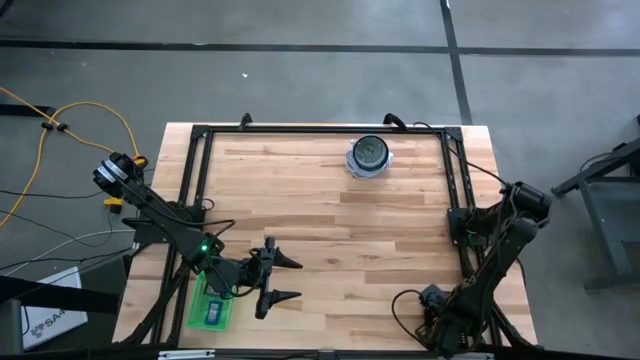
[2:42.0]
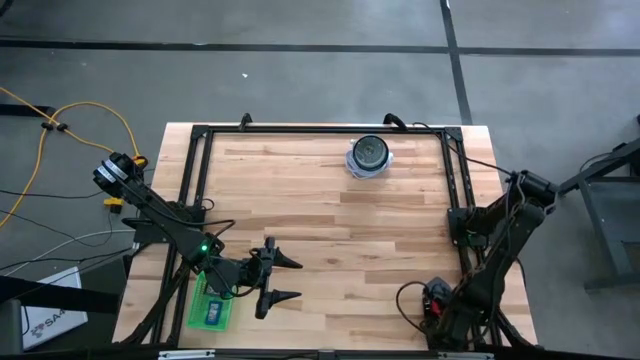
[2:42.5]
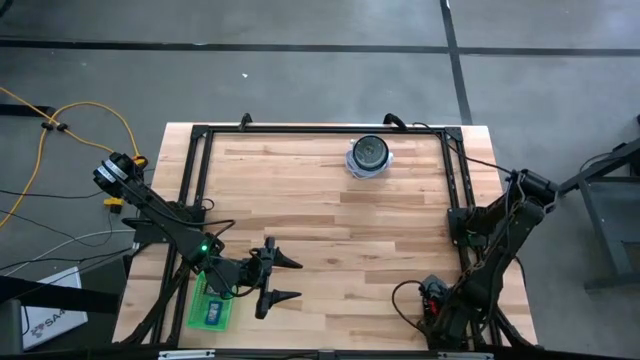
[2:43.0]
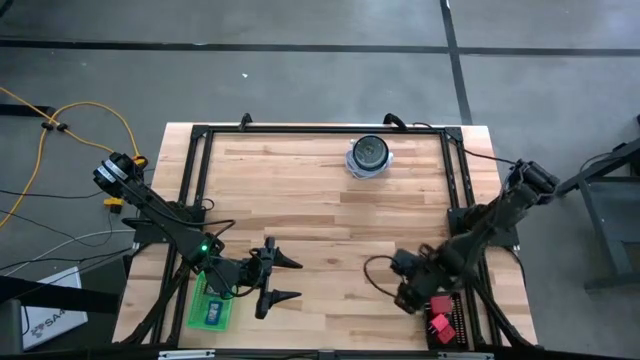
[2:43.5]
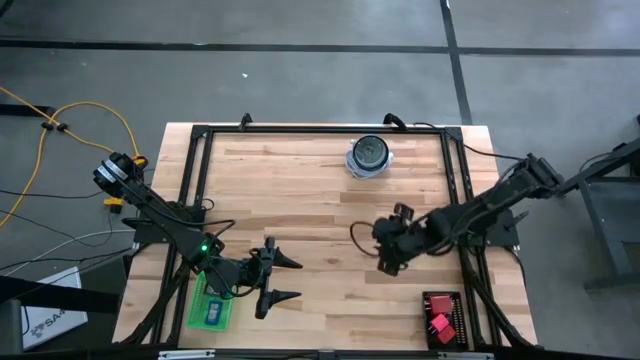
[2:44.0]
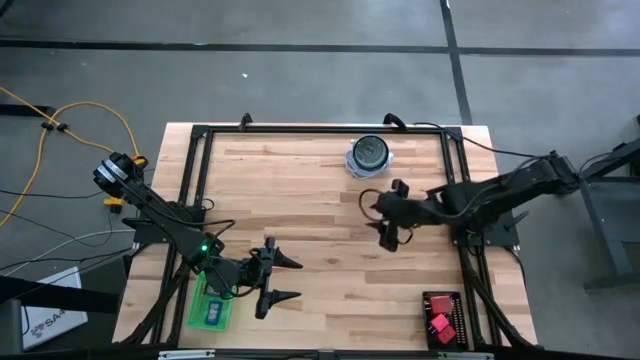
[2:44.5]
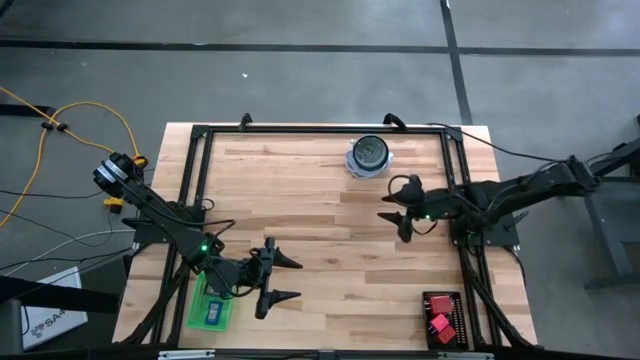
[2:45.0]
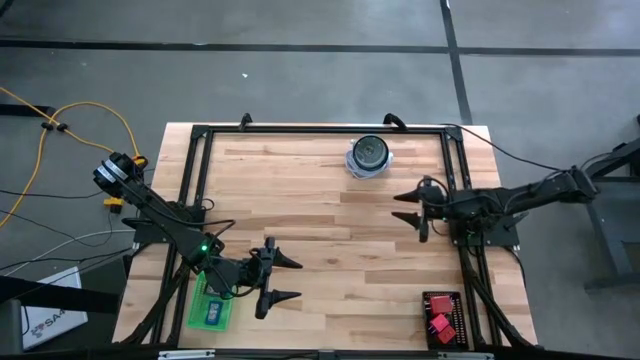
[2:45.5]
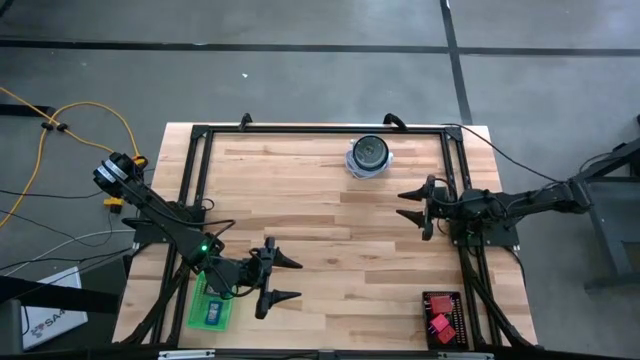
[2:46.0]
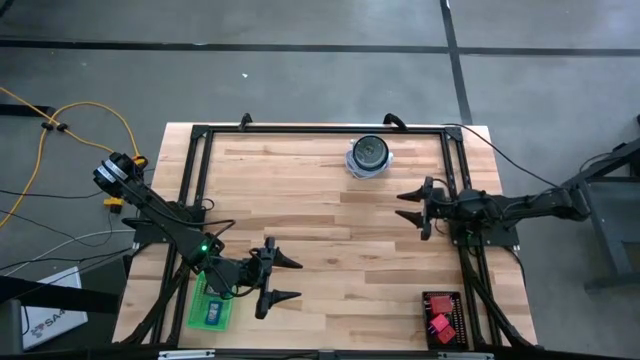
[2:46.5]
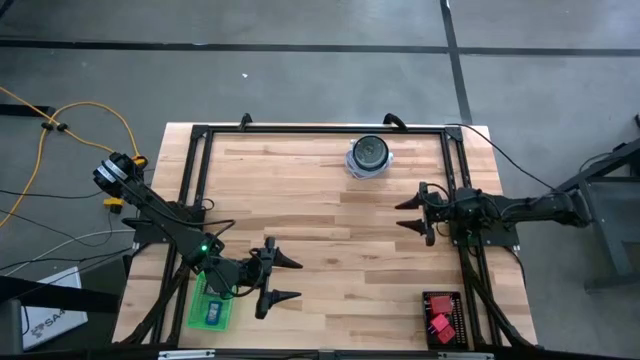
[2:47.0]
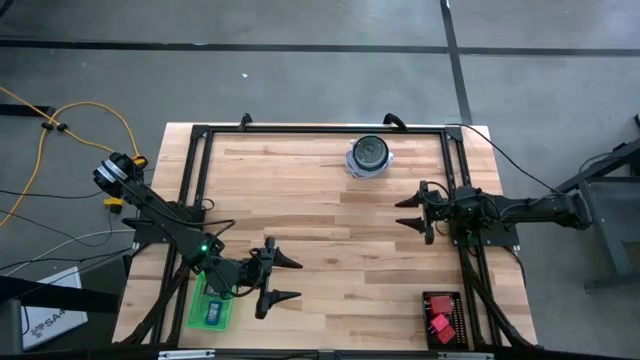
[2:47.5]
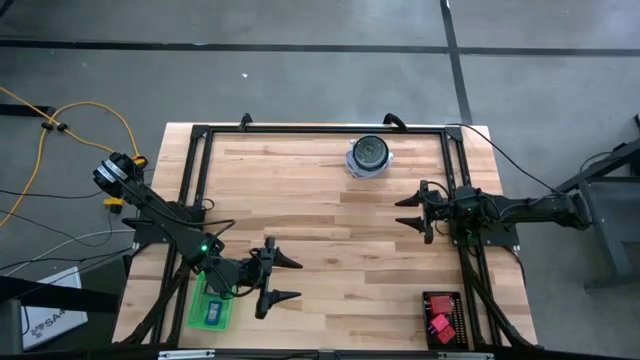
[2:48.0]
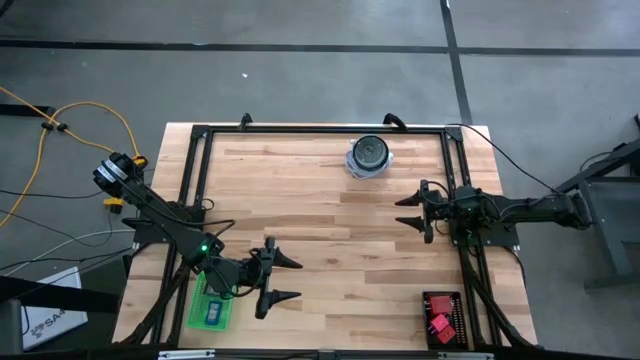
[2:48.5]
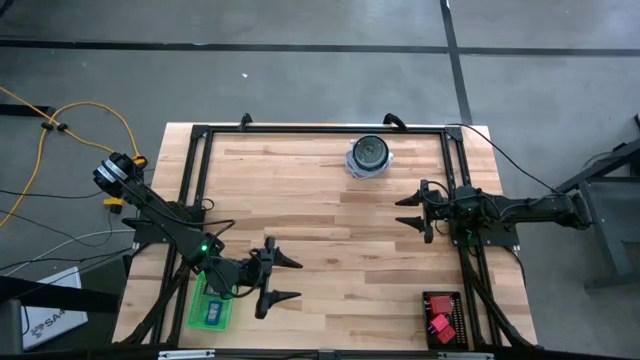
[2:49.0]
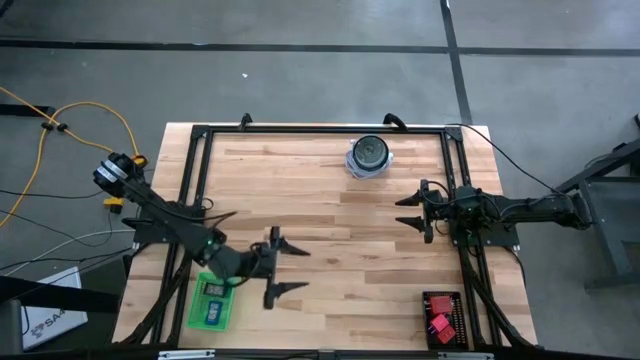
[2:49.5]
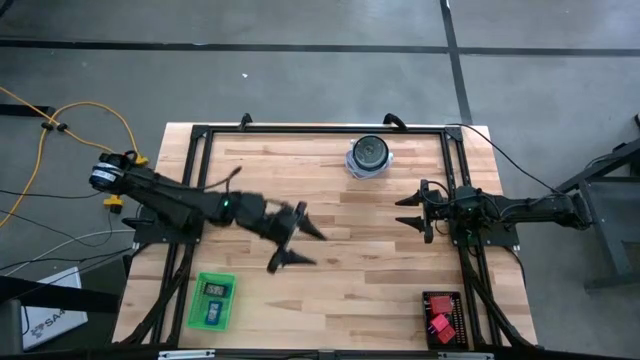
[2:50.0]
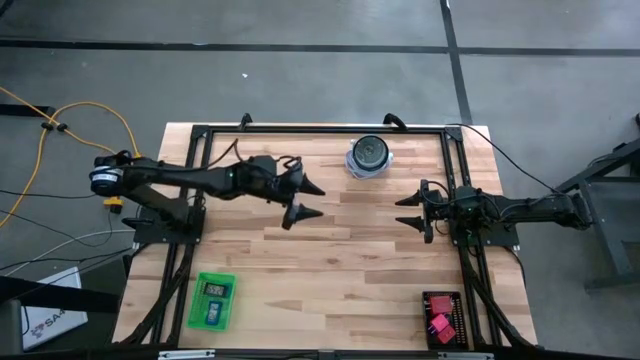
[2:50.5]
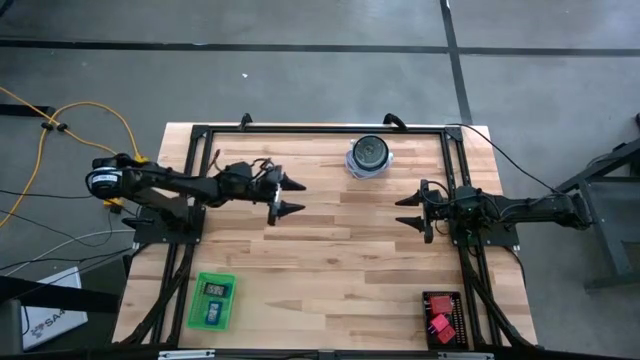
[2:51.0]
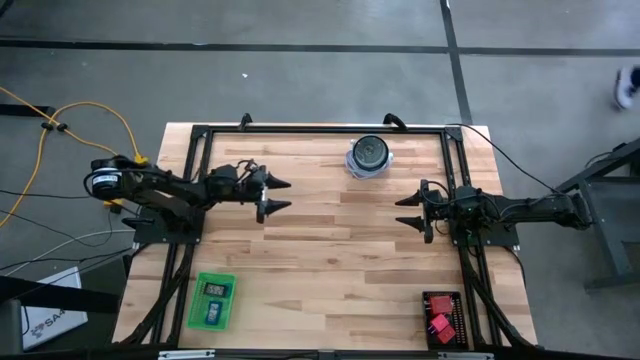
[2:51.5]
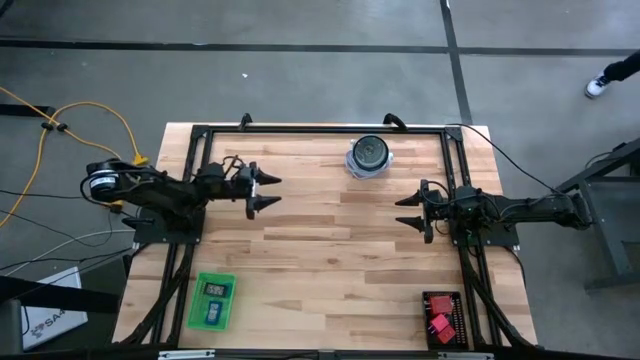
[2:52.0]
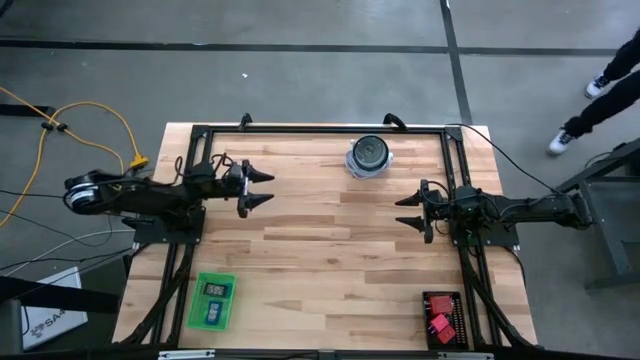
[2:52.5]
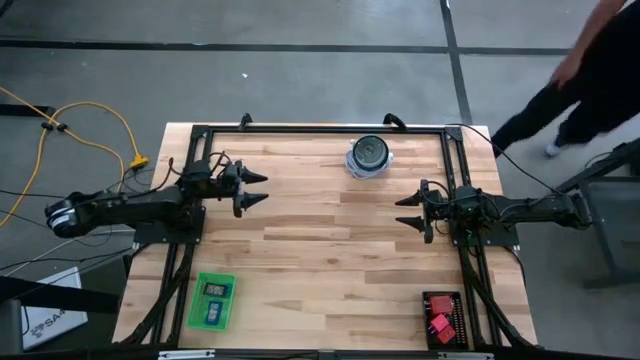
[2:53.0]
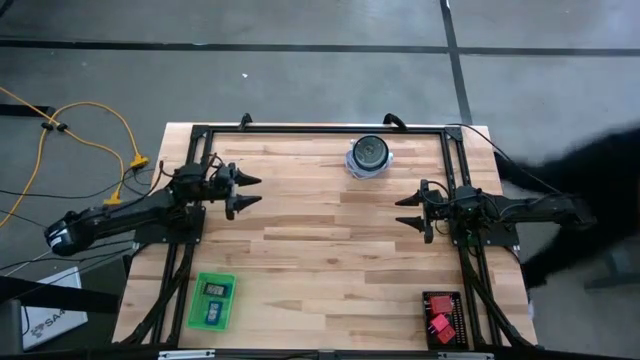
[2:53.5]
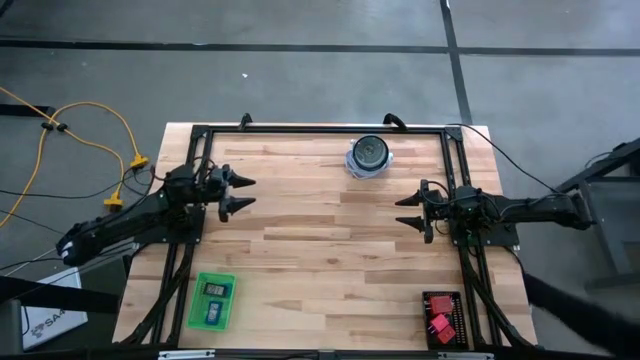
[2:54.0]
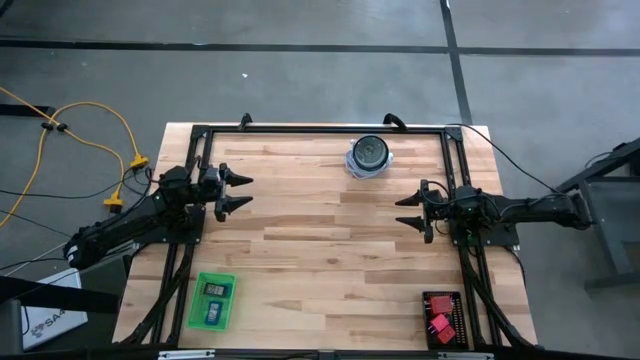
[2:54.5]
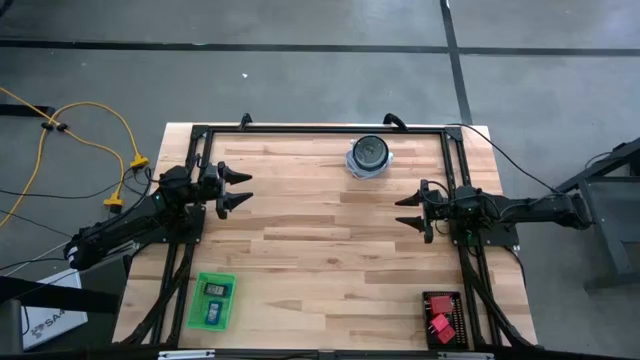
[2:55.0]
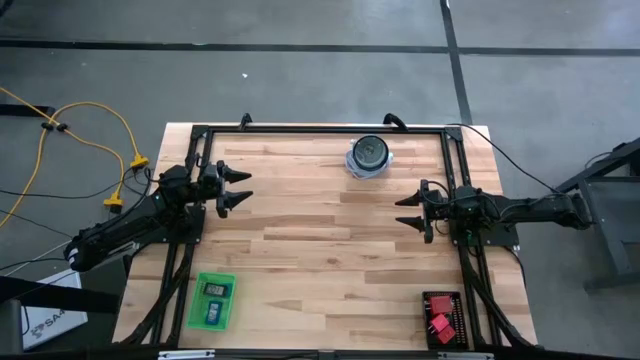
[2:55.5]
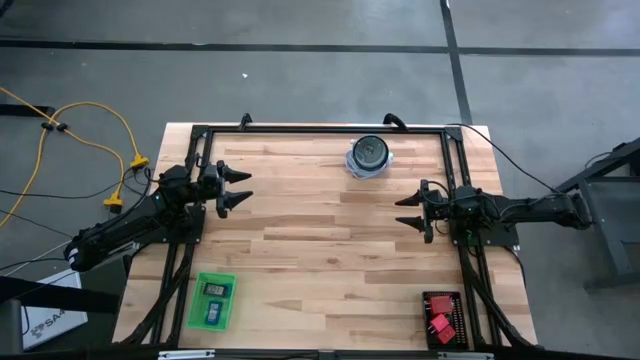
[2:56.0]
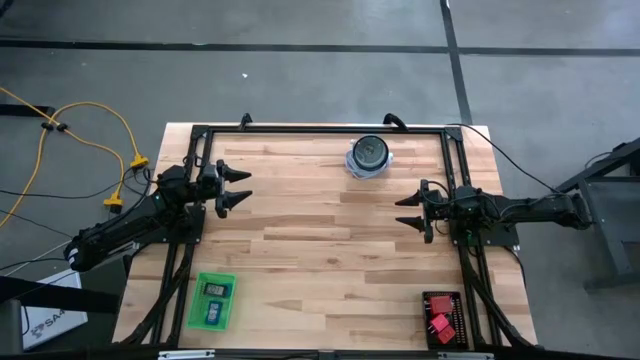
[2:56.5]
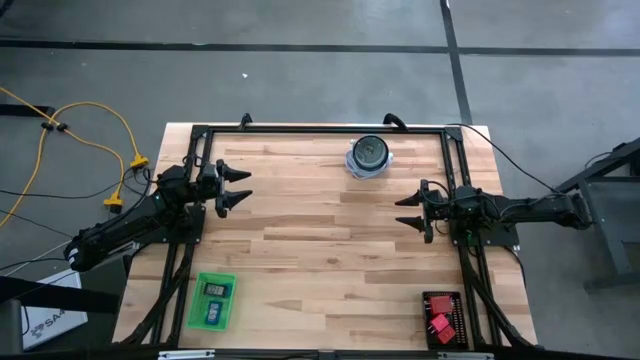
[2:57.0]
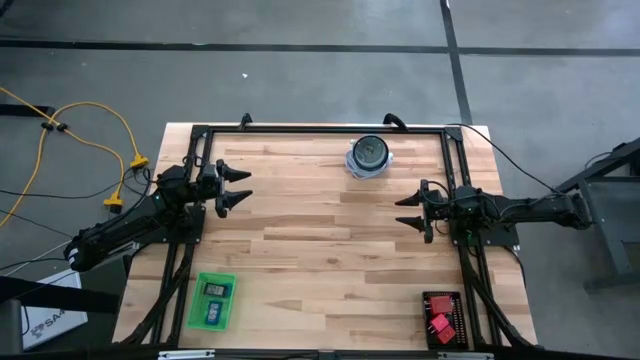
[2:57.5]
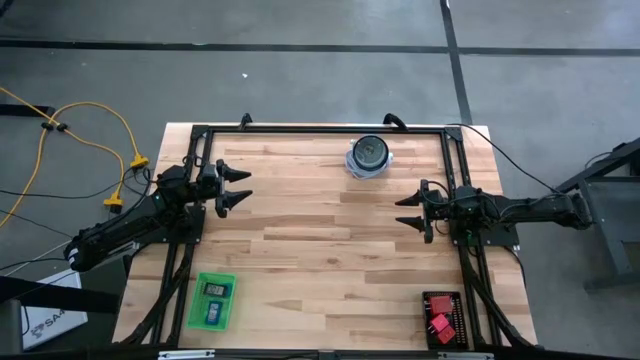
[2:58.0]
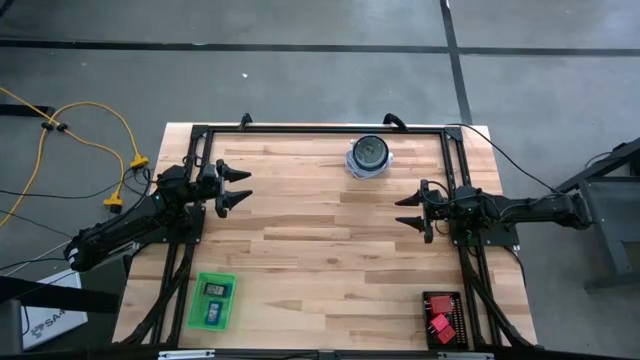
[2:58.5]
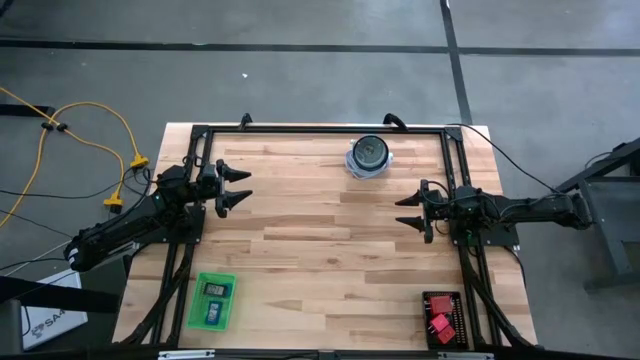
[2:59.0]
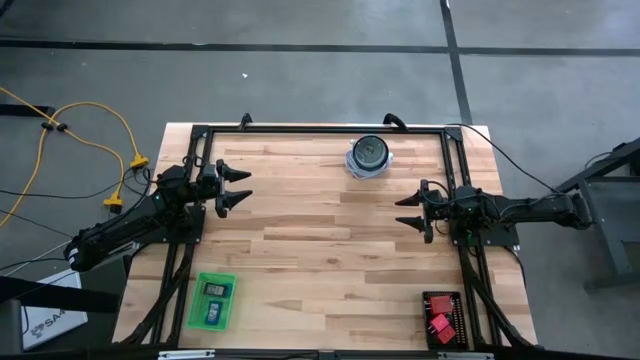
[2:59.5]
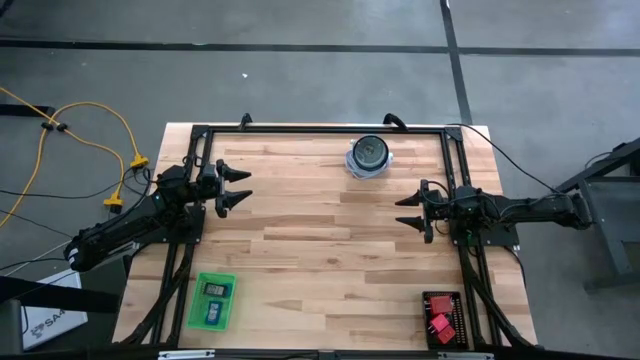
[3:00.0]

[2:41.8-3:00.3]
Task: Pick & Place Office items
Return to Home Position

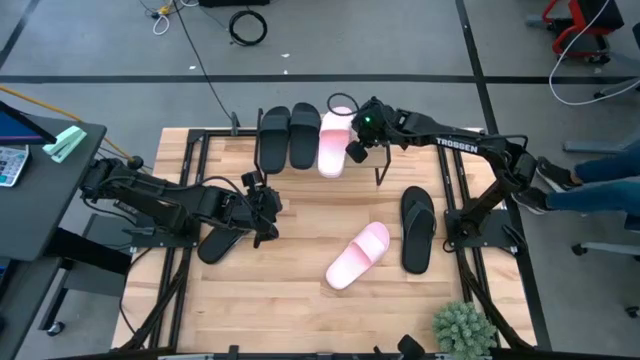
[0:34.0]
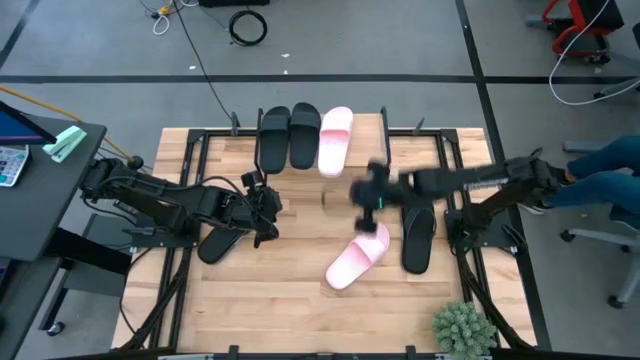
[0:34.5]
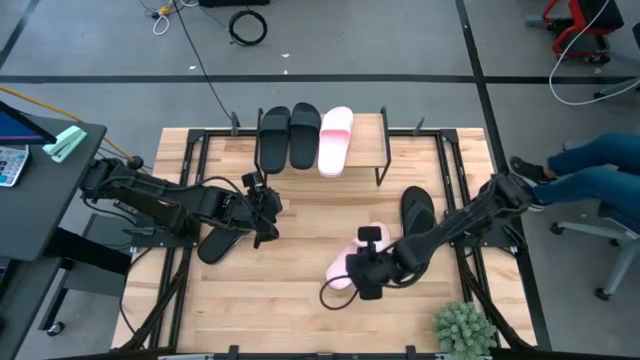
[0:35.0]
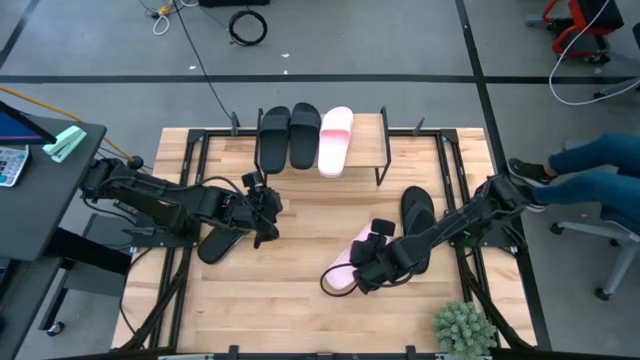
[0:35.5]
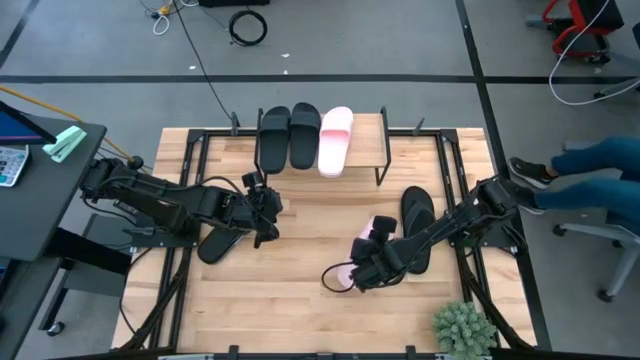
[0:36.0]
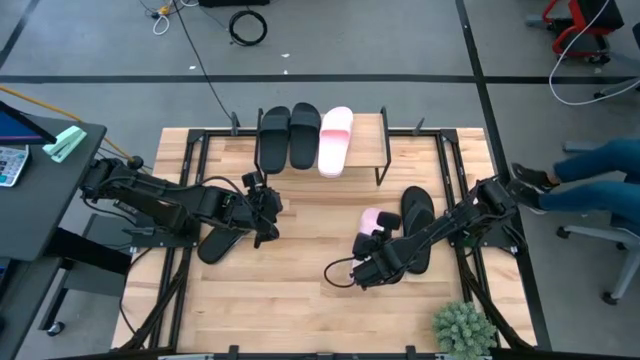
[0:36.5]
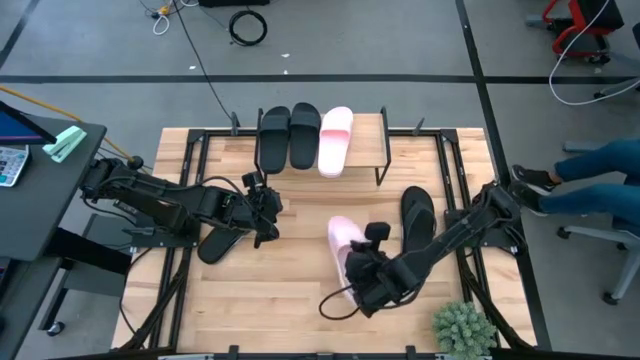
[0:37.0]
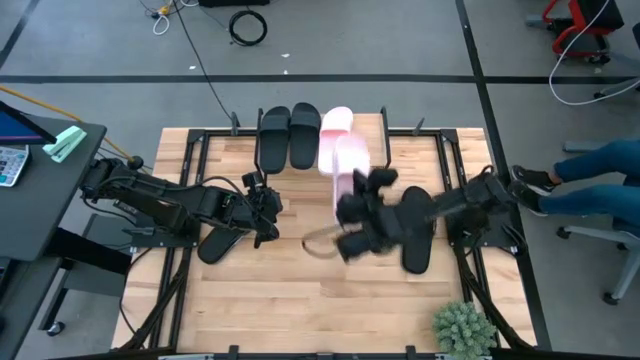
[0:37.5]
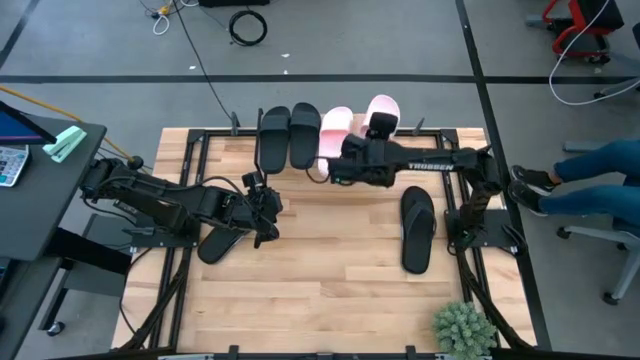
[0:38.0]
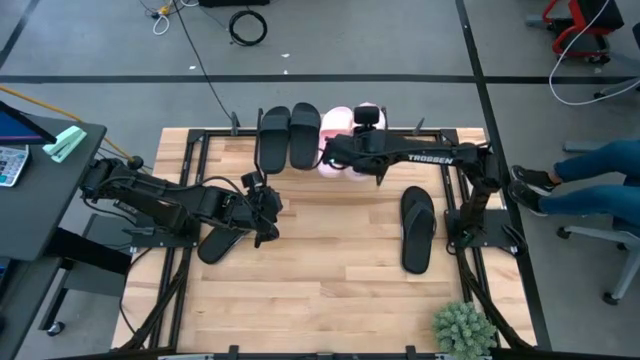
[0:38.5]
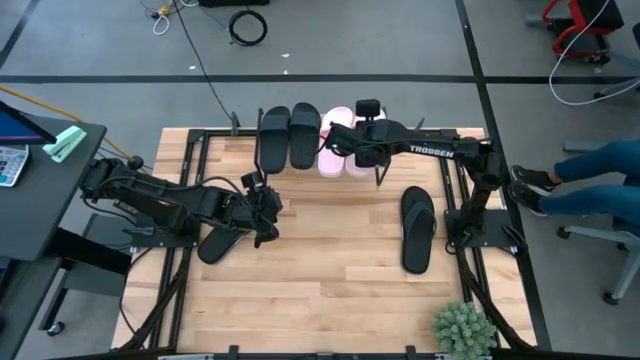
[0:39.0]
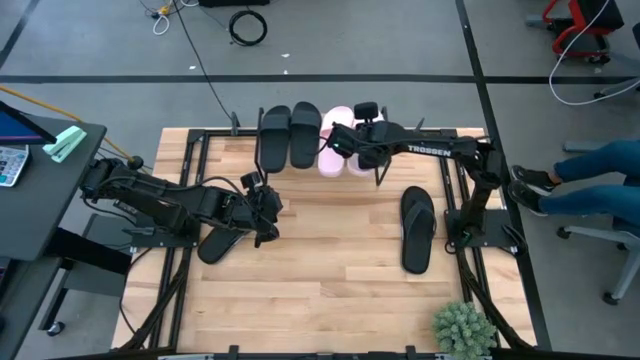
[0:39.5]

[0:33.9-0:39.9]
Task: Pick and place slides into the shelf
Put the pink slider on the shelf
